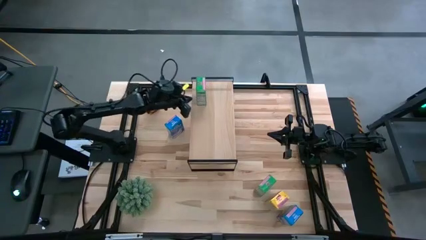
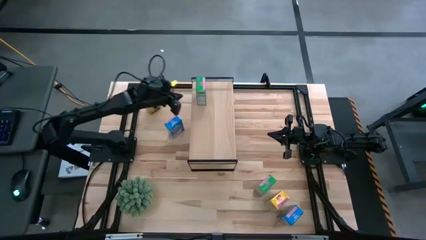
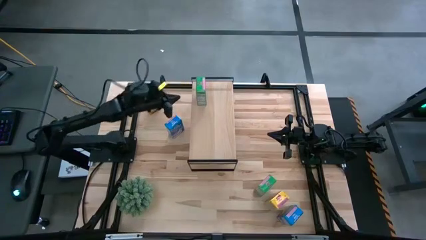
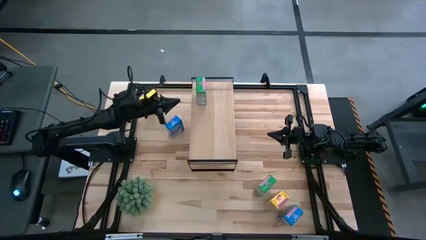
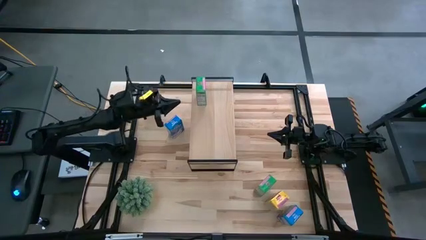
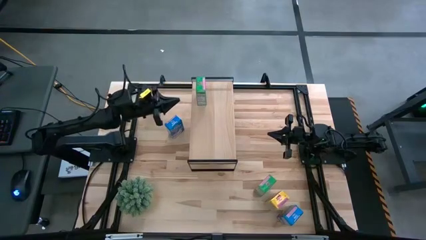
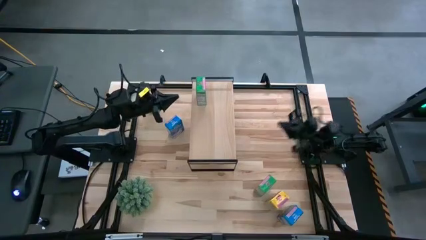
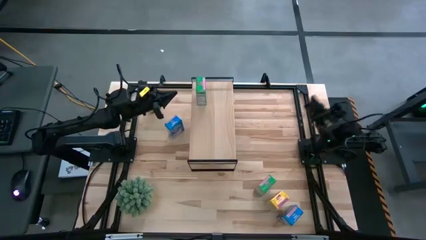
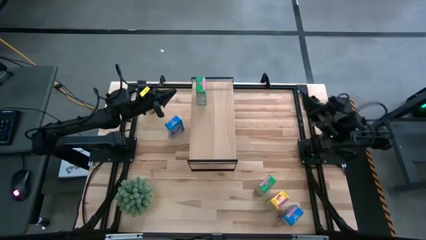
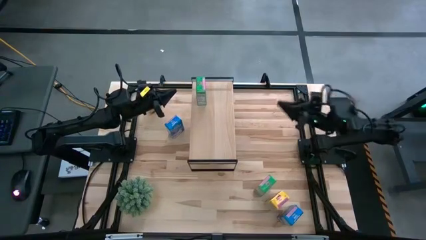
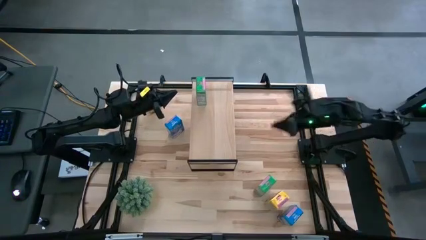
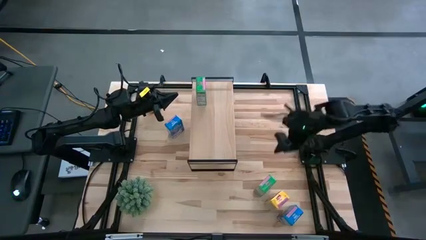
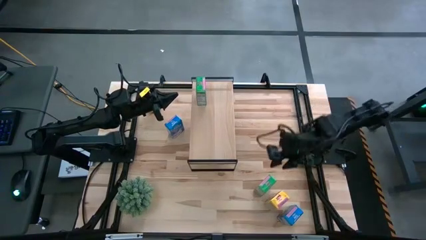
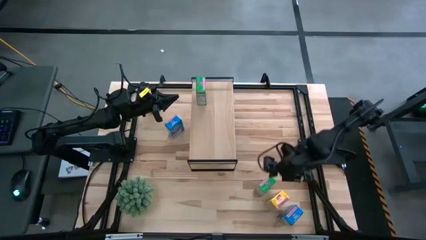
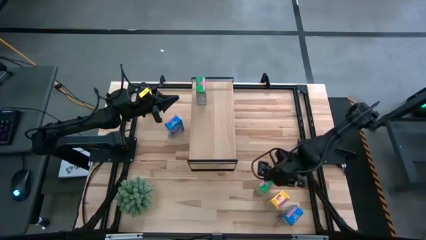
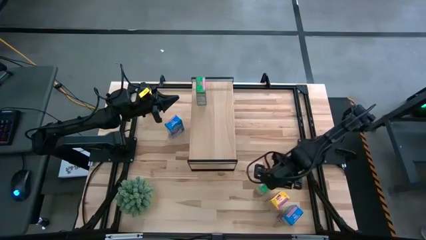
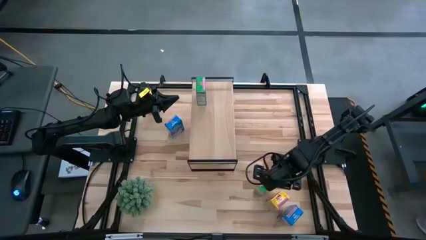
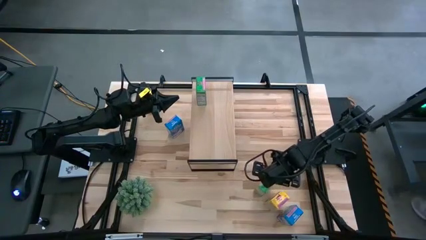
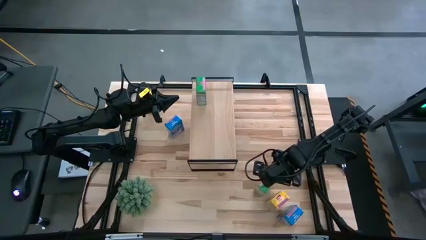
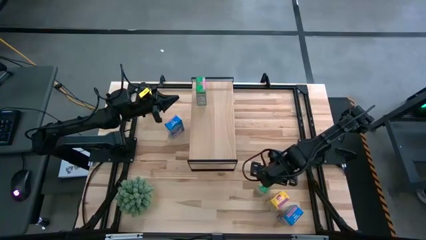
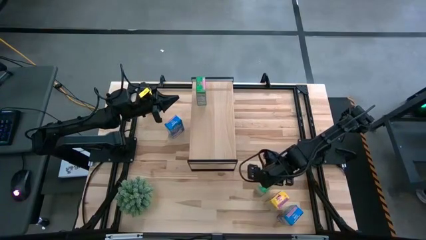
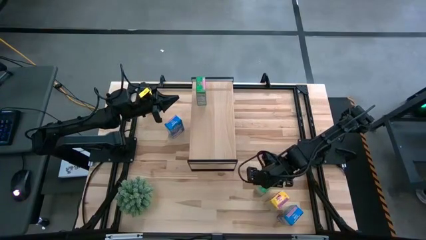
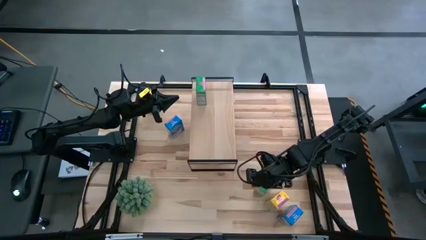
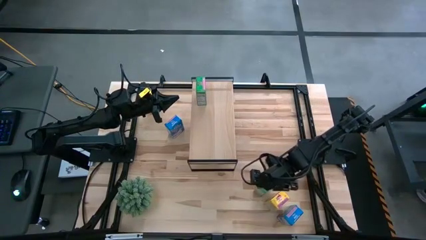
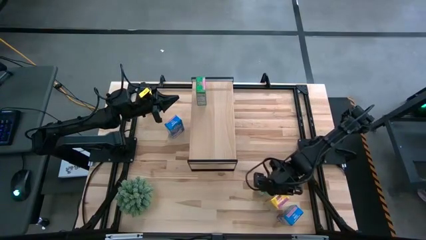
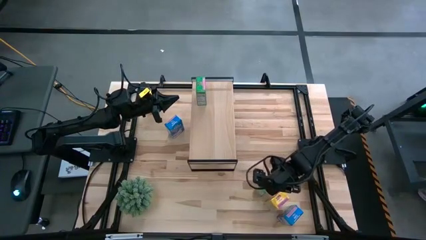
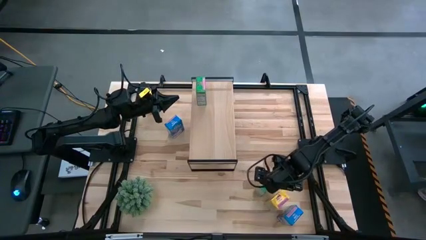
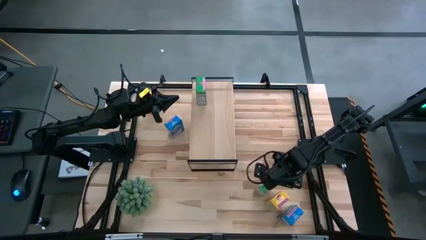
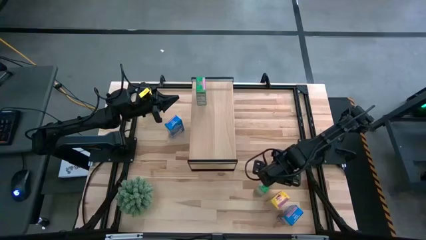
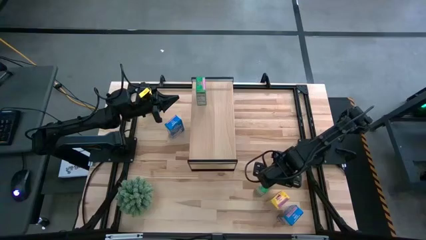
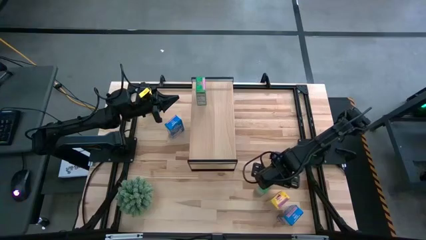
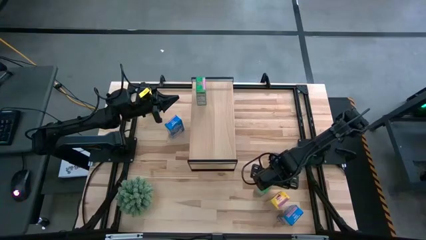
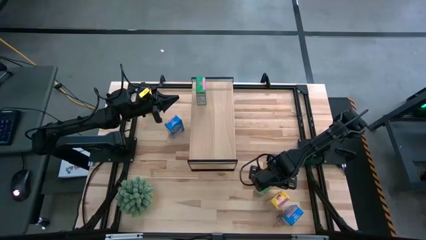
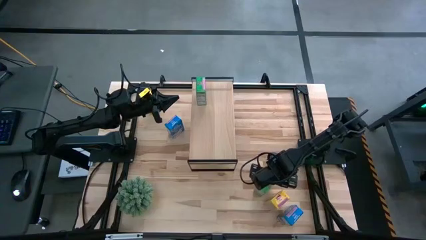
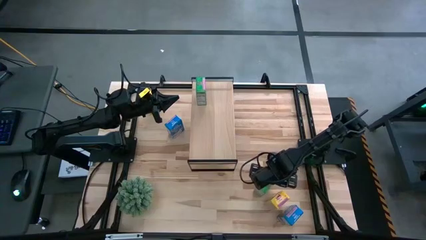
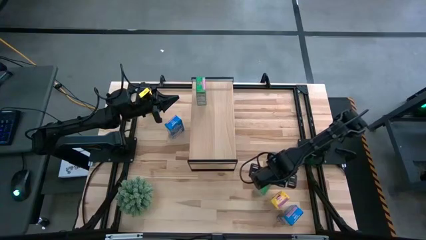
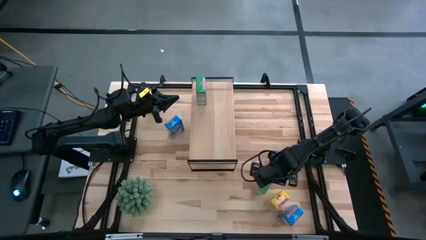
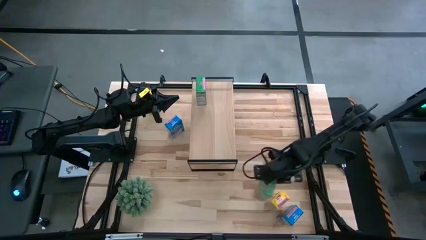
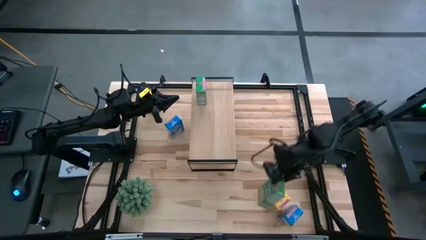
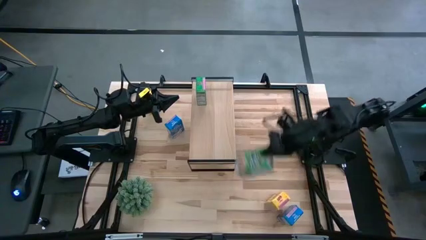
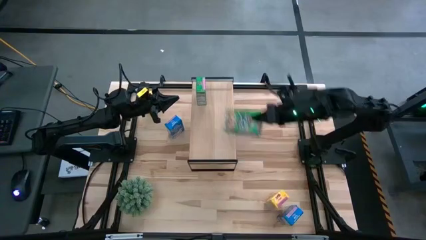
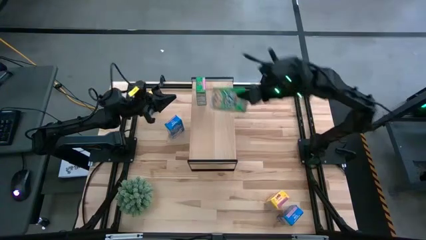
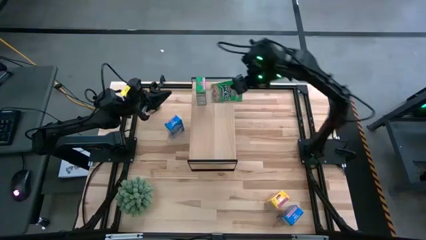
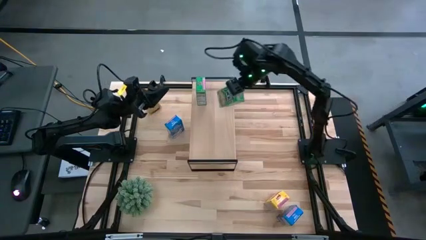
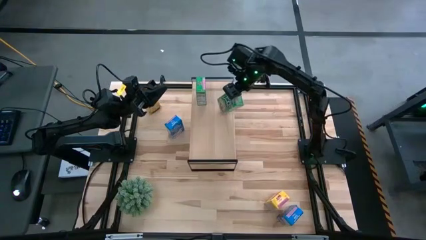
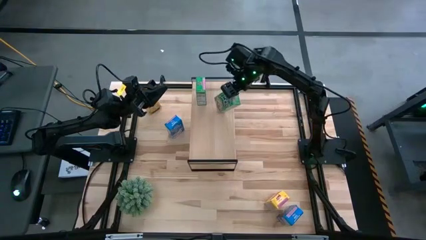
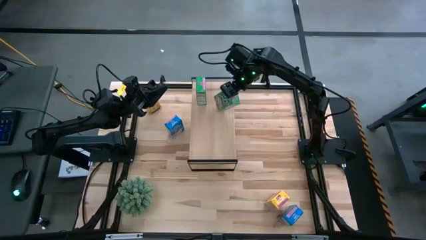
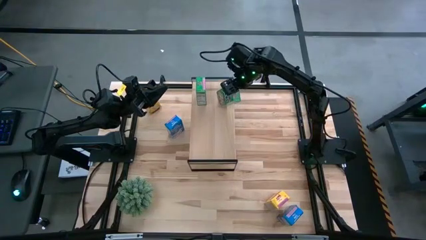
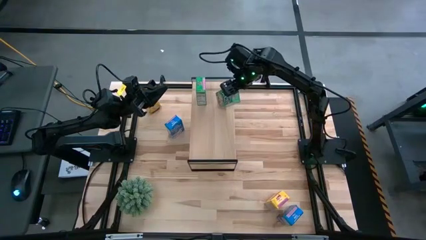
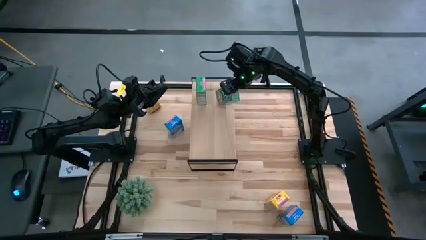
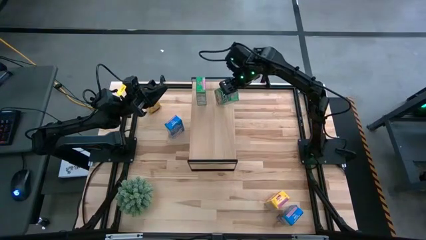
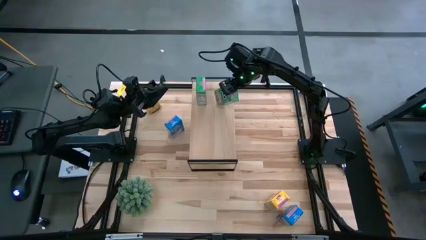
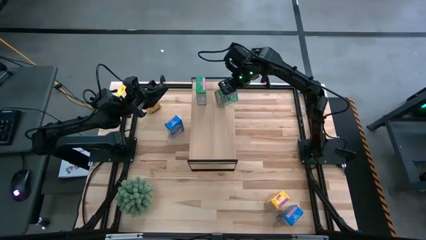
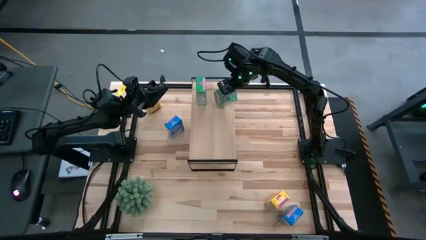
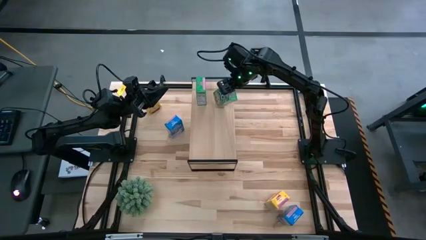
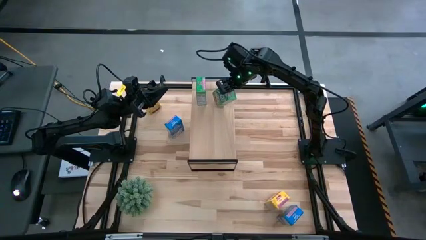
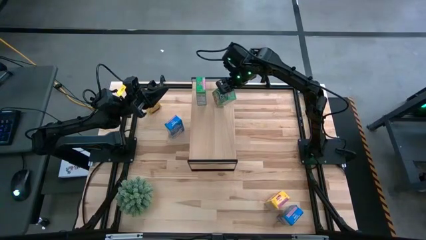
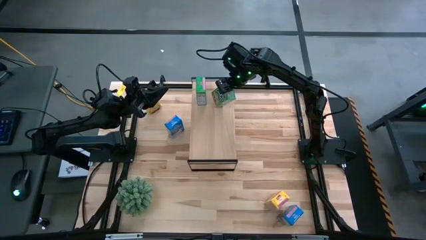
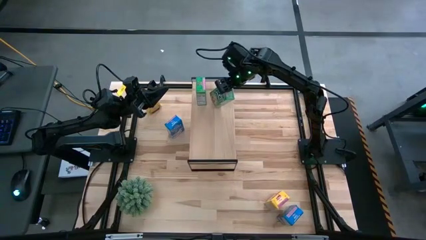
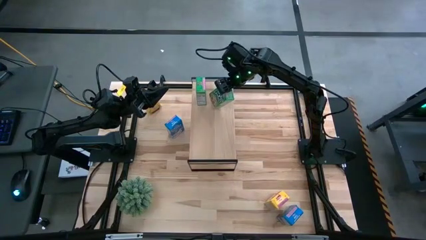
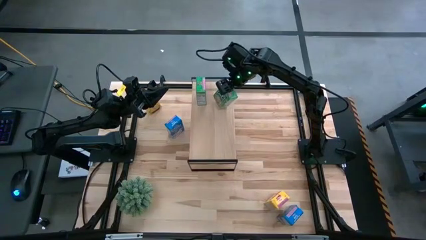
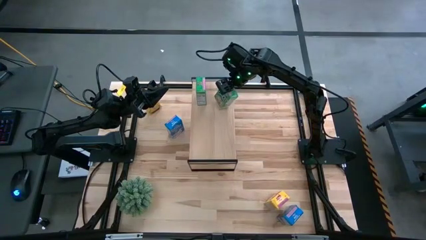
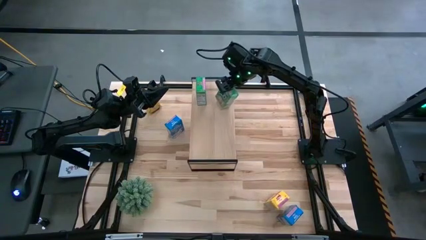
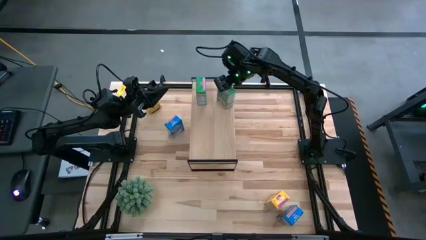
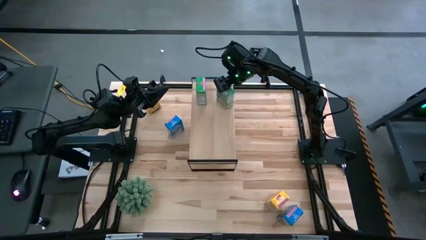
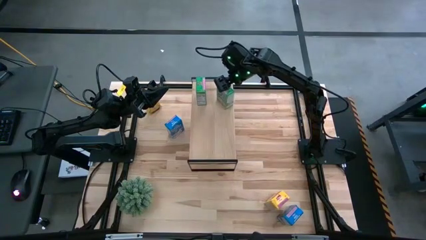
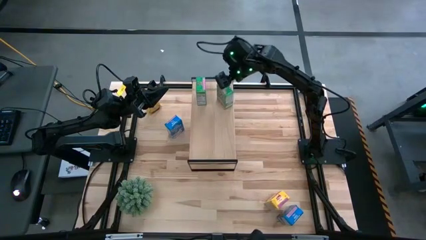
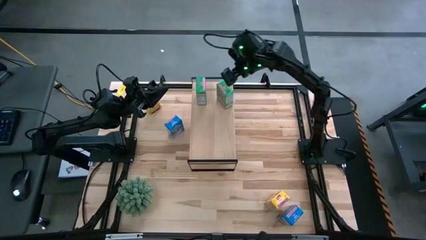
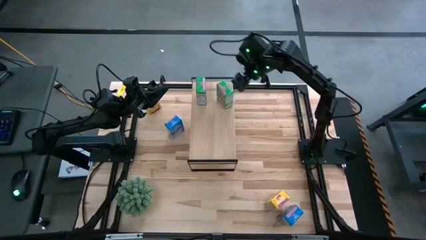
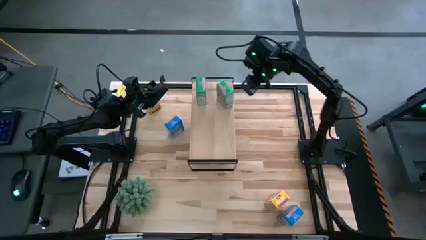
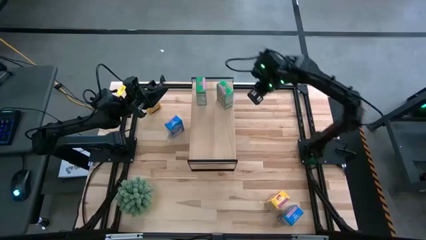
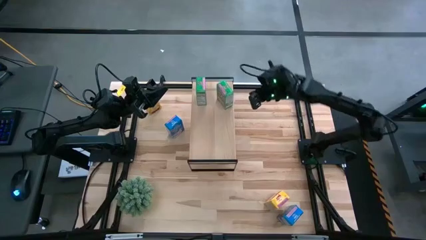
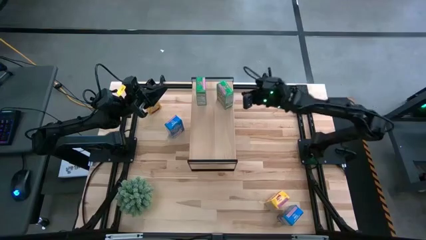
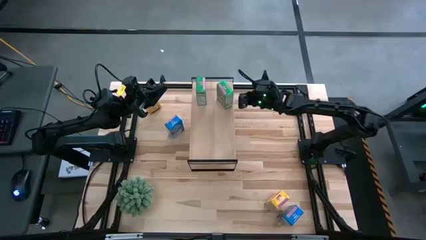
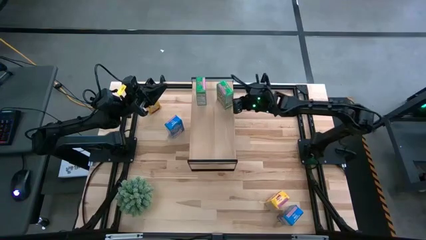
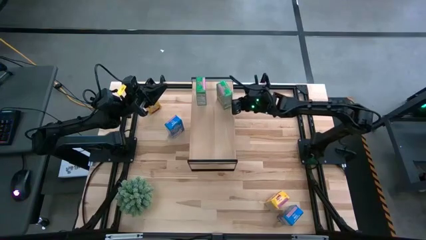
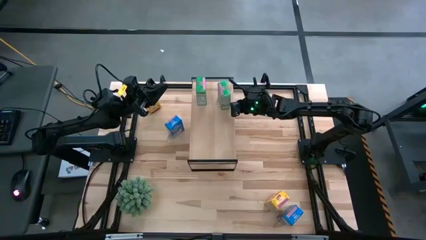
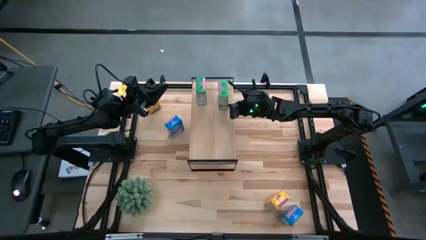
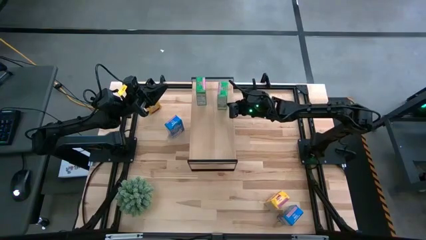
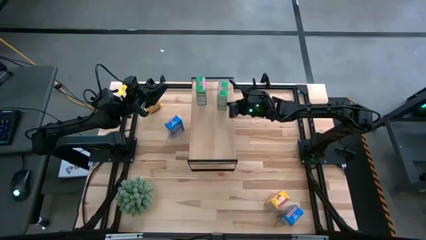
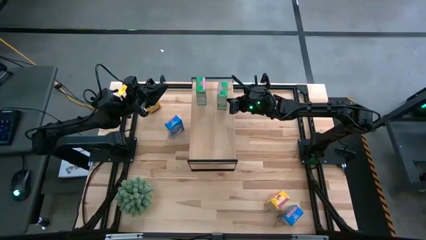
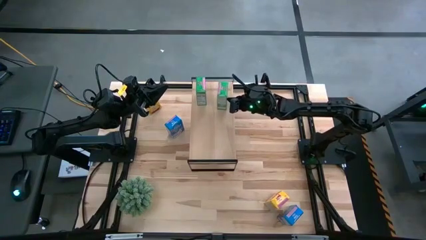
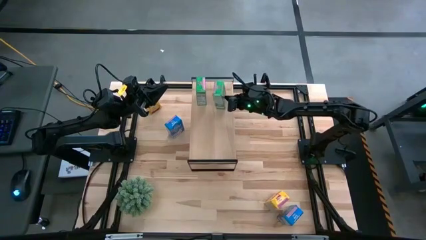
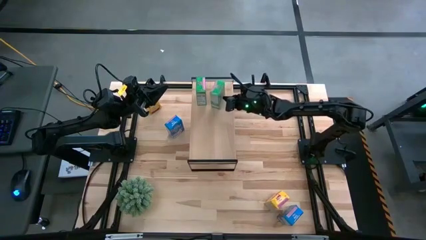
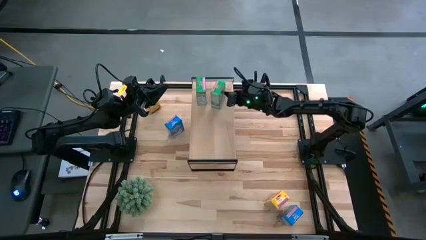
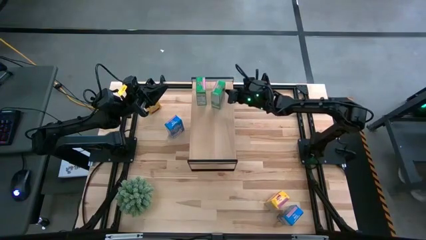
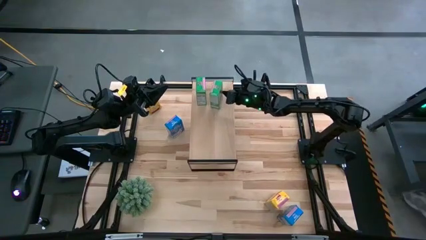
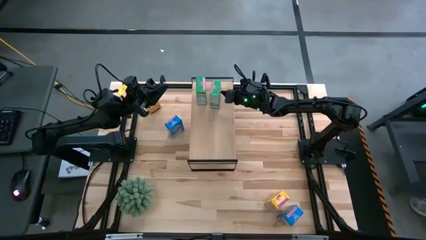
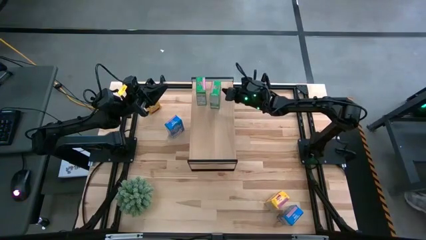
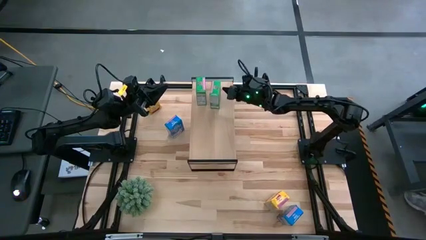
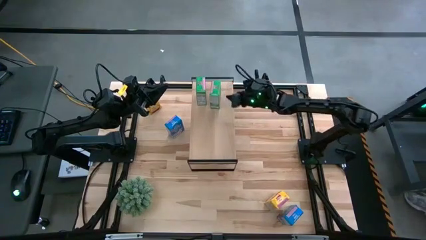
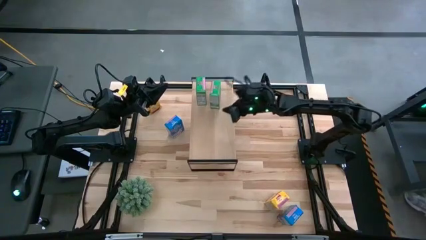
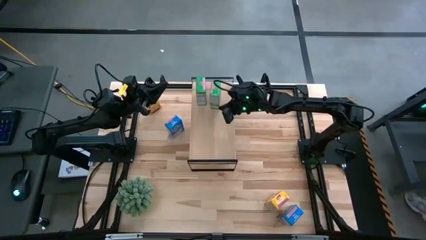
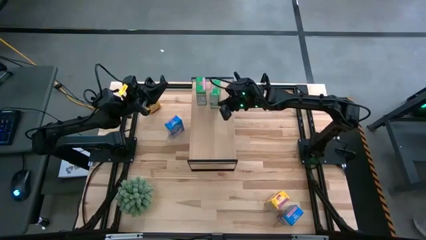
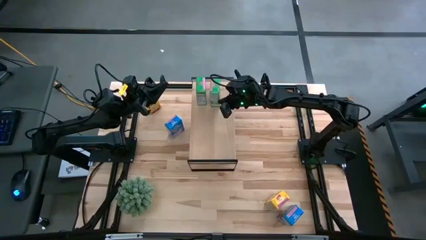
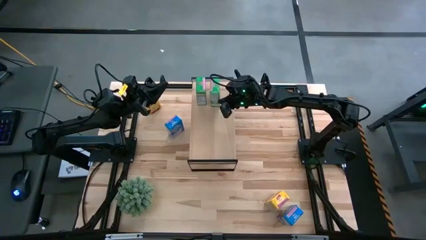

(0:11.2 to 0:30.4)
Task: Stack cereal on shelf
Put the green cereal on the shelf
